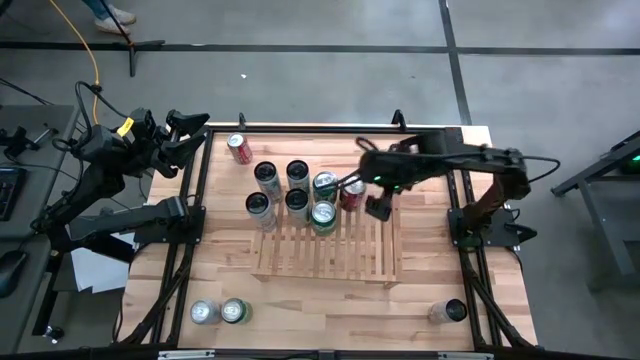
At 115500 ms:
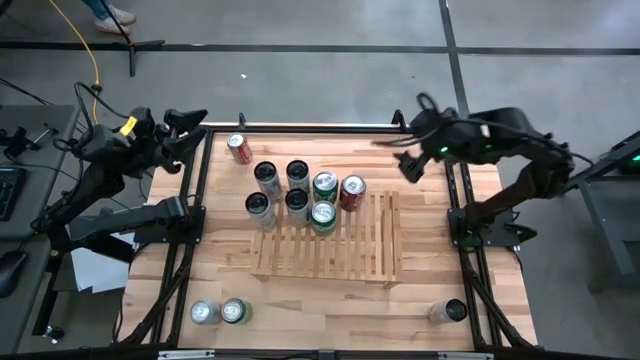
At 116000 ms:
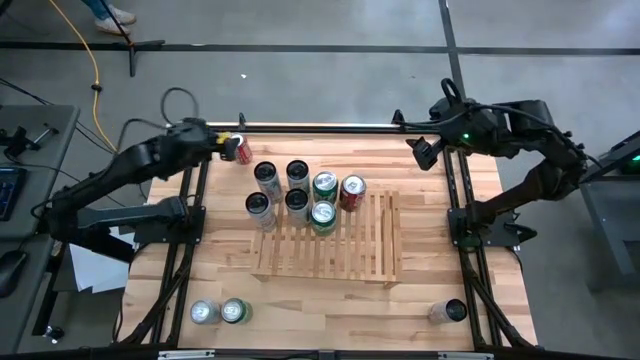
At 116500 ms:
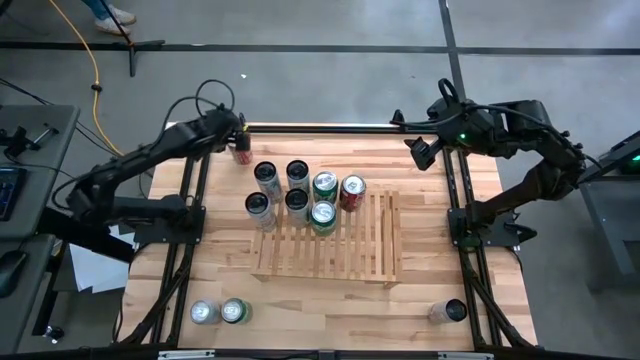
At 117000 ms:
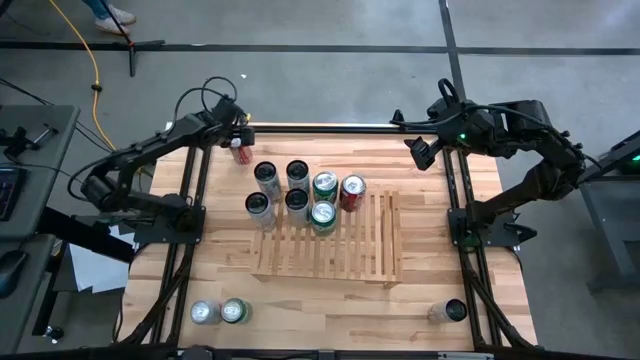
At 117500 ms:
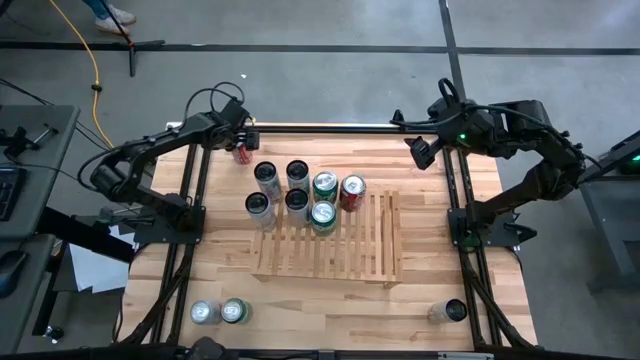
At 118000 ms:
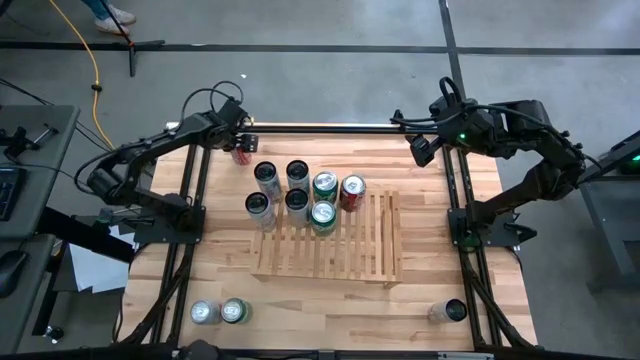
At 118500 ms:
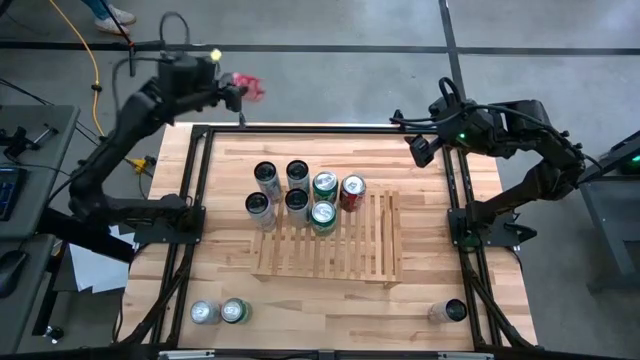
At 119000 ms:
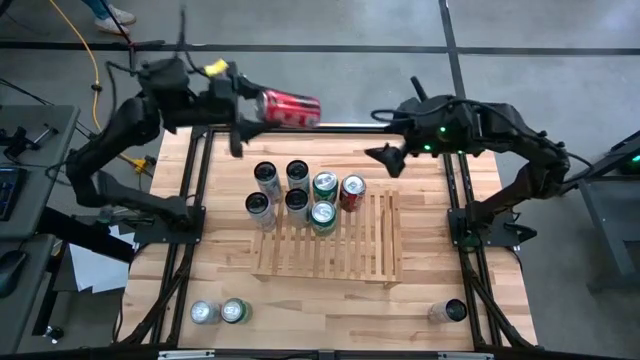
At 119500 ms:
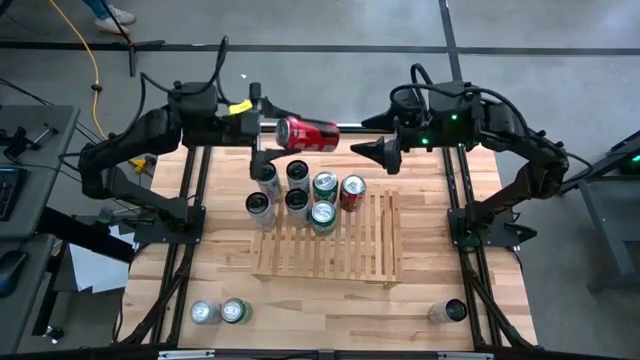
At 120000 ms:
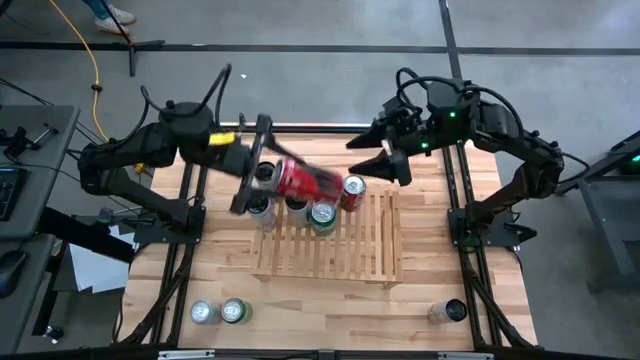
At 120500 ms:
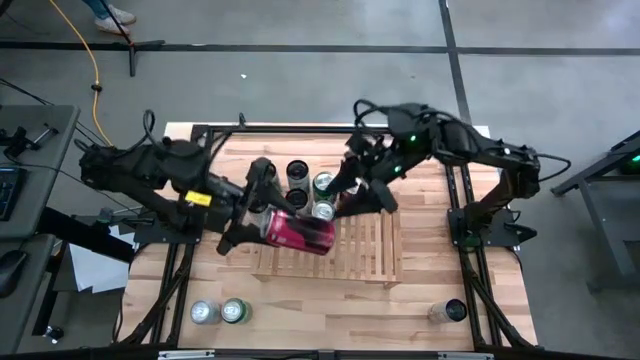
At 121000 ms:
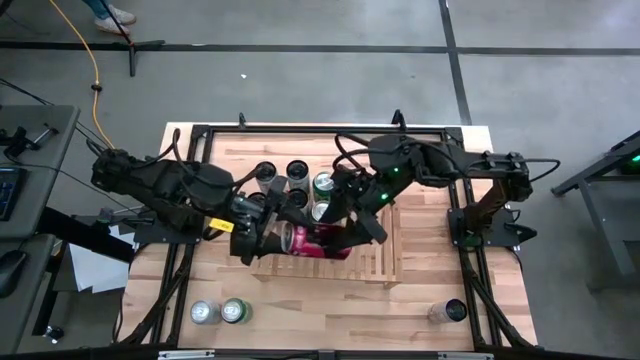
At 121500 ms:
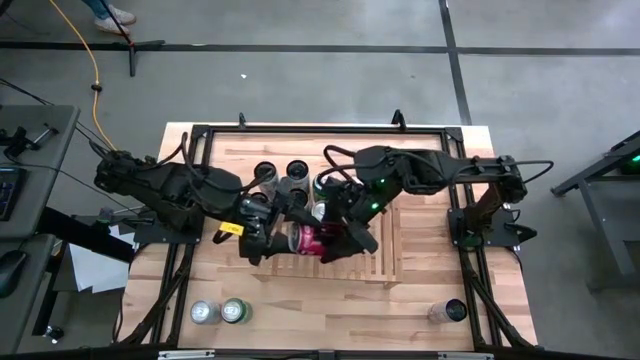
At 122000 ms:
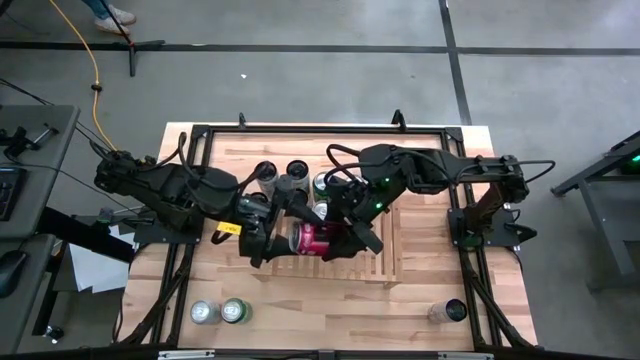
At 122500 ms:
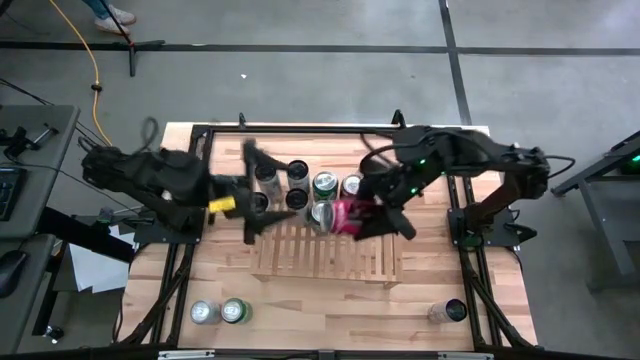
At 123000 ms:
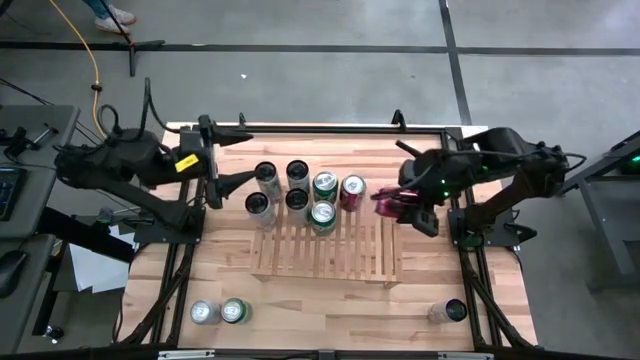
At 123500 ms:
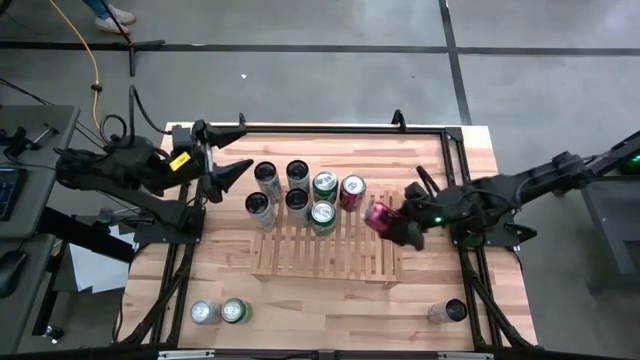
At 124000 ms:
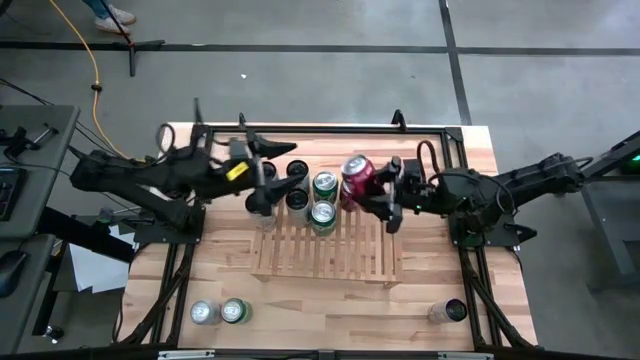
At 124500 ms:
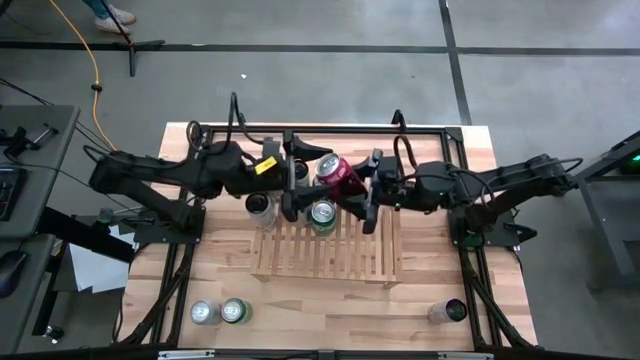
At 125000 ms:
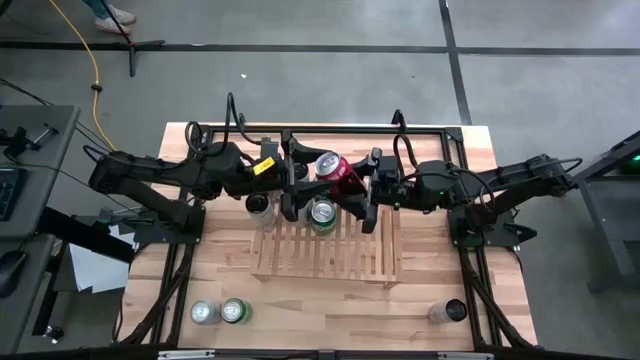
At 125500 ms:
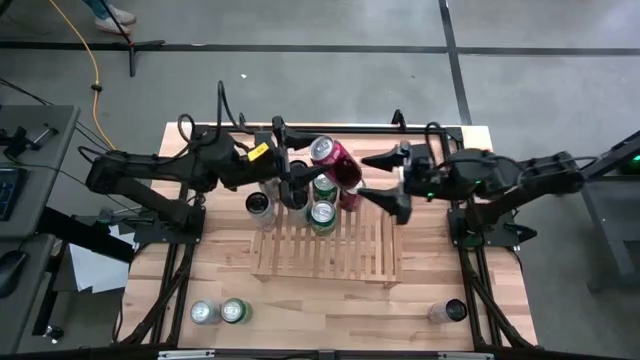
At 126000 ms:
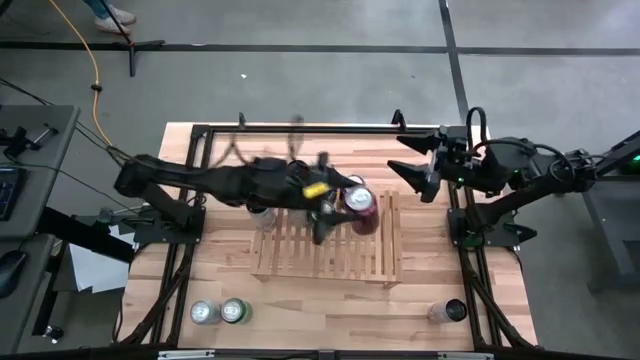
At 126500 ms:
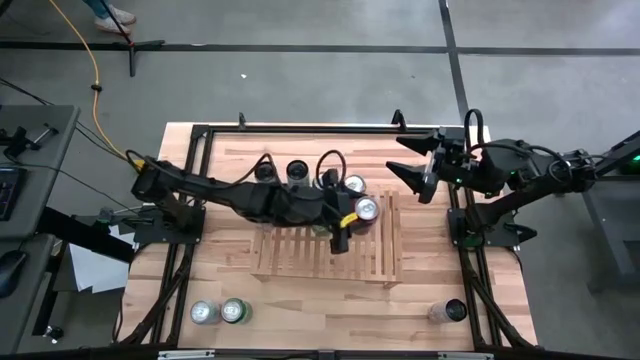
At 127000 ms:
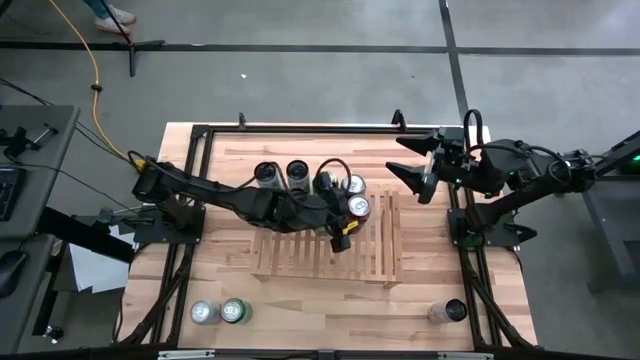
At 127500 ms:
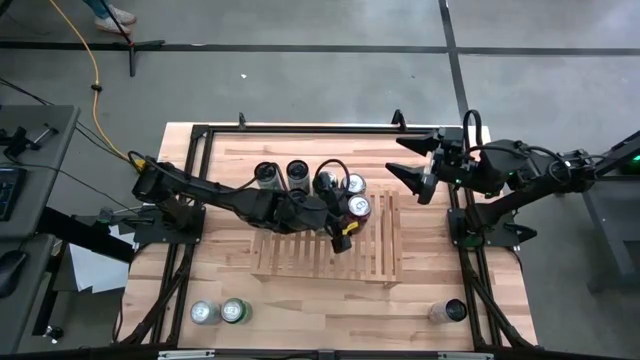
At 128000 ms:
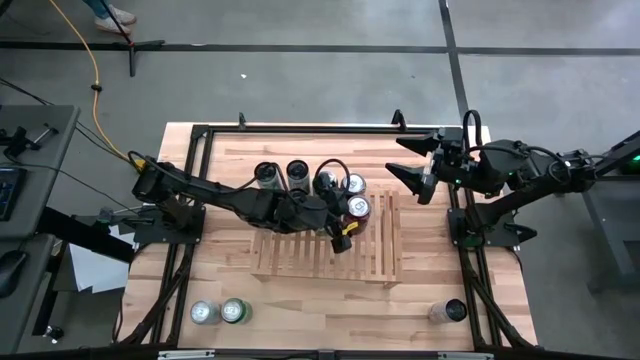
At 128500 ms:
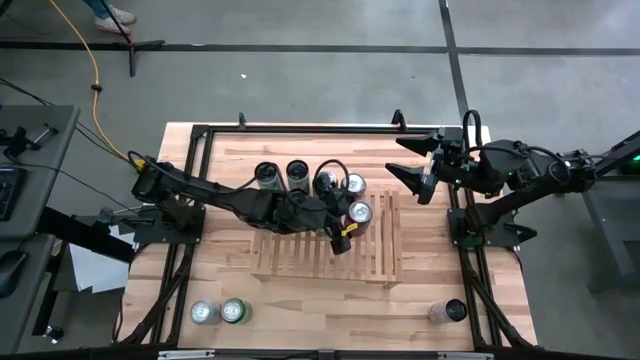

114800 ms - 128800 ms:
Task: Place canned beverage on shelf
Put the red soda can aligned with other red soda can on the shelf

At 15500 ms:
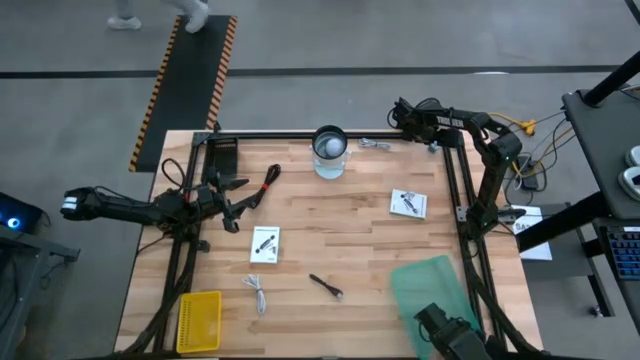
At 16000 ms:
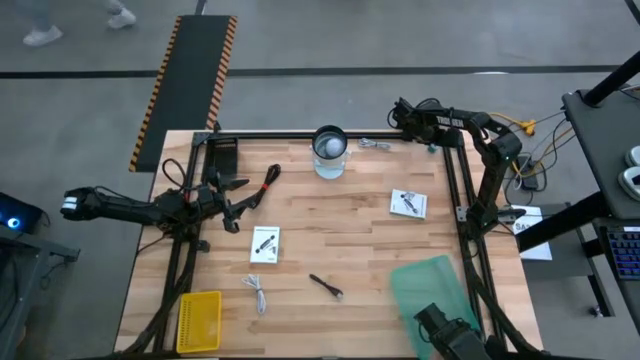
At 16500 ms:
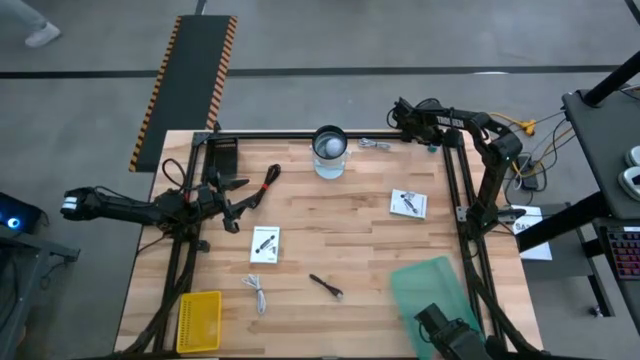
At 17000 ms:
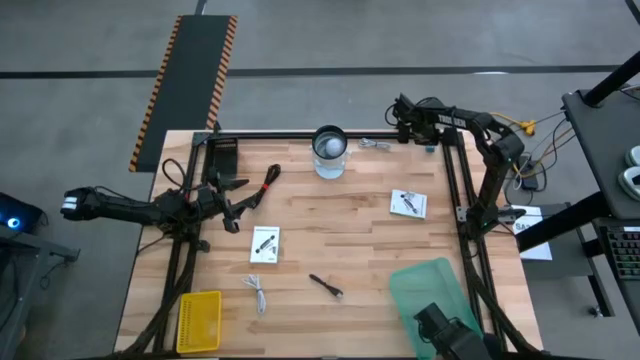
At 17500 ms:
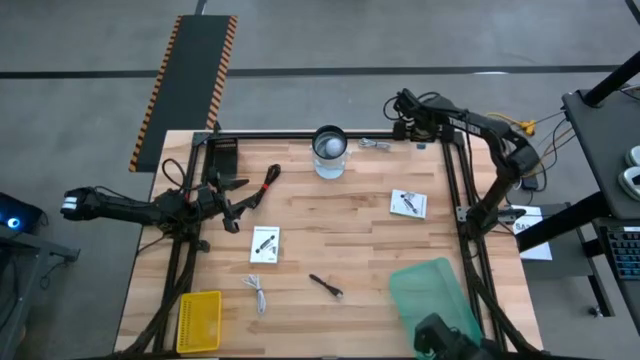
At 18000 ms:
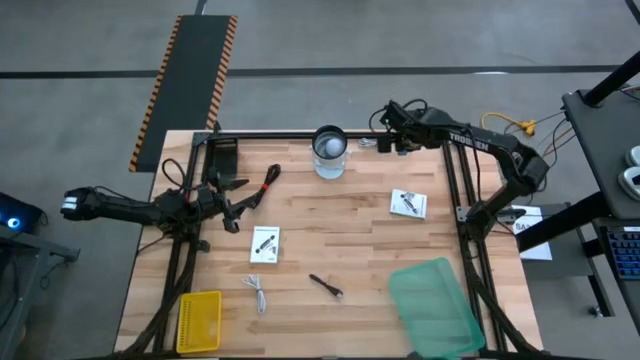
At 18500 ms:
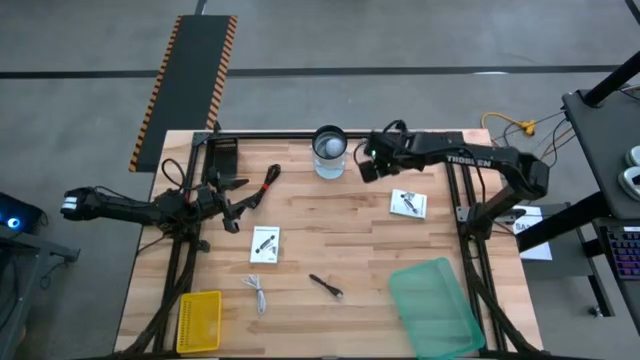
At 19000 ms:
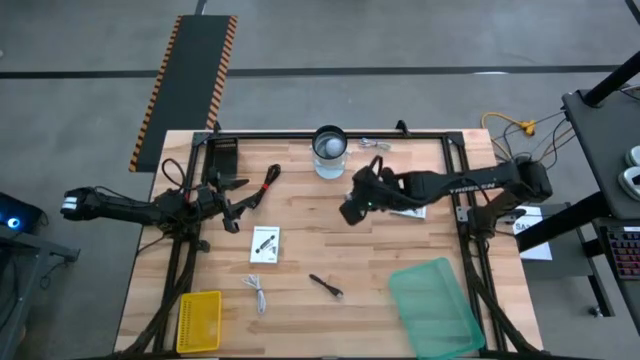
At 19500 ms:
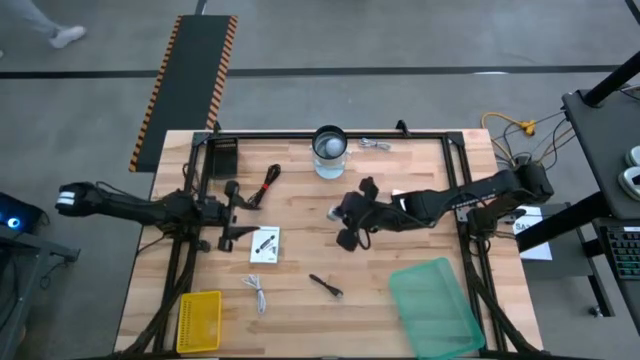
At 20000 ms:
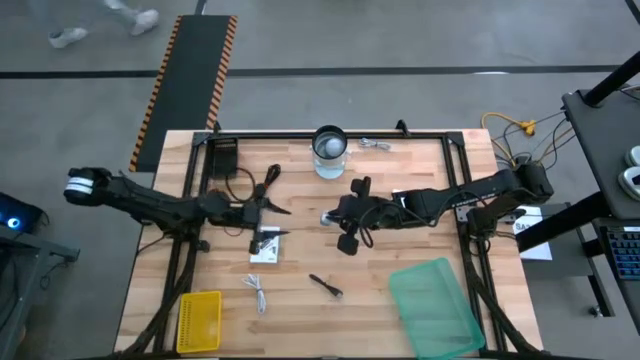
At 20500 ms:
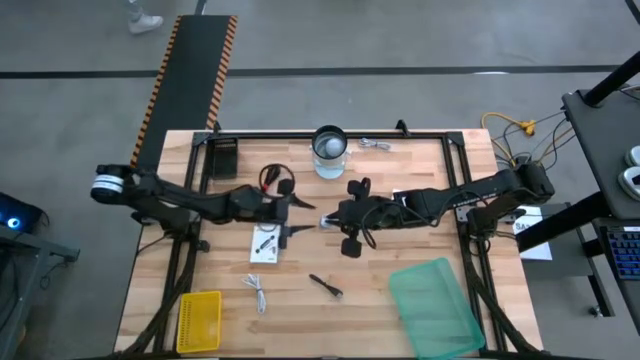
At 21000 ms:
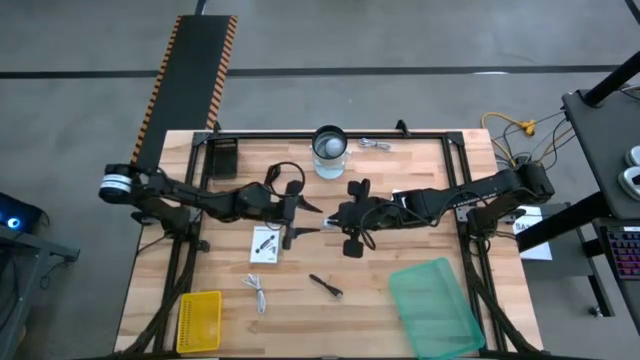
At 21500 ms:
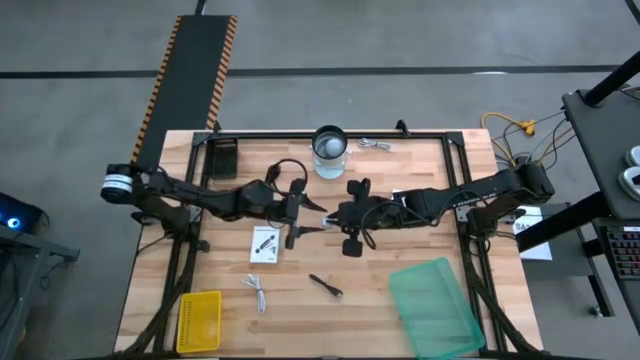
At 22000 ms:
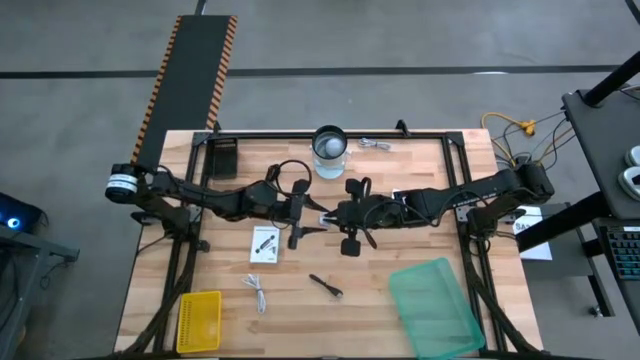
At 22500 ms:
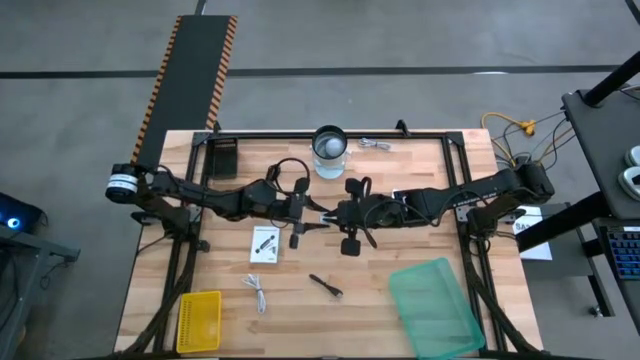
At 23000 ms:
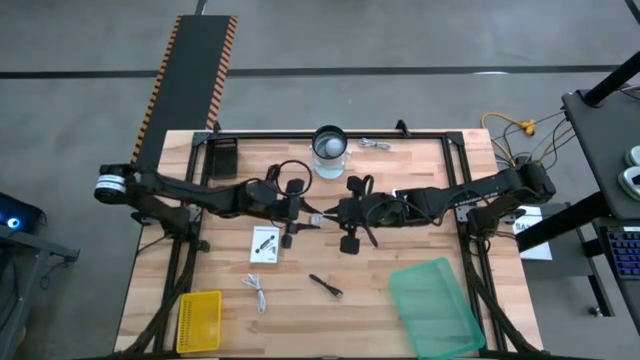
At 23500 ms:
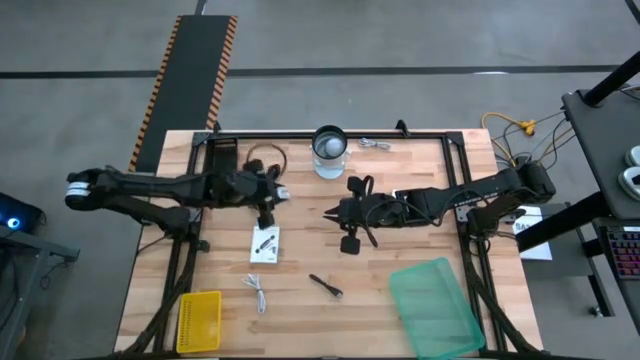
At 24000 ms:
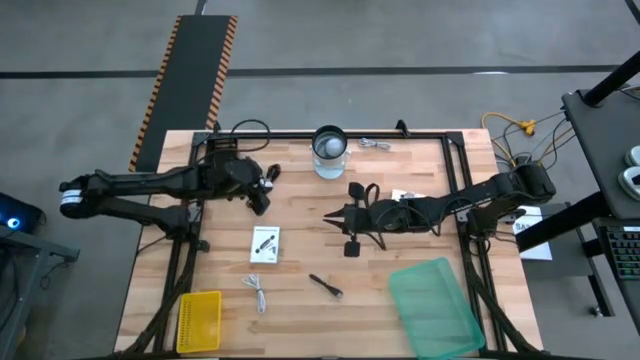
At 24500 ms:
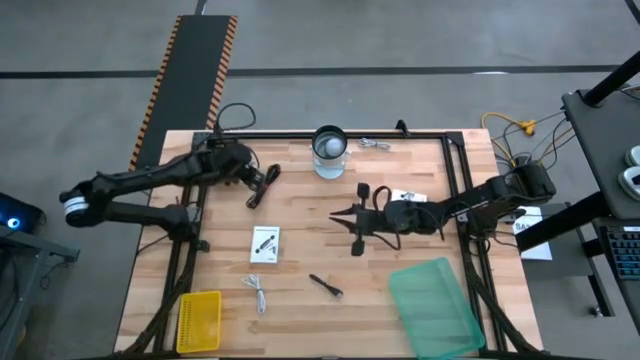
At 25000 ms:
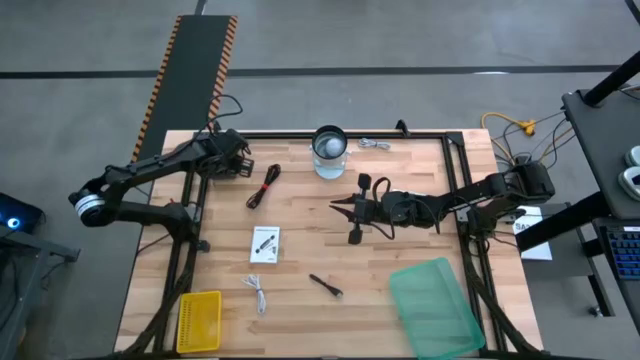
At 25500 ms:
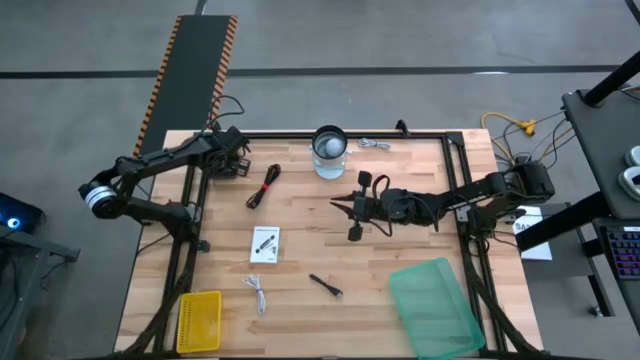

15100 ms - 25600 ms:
Task: Pick and place items into bin
Put the blue charger adapter into the black bin
